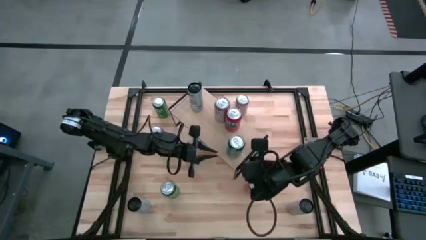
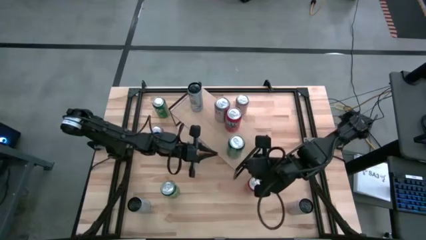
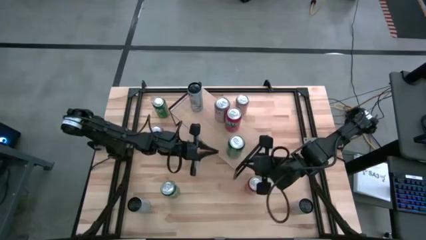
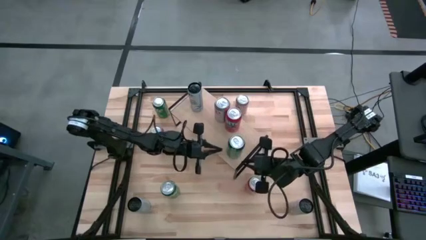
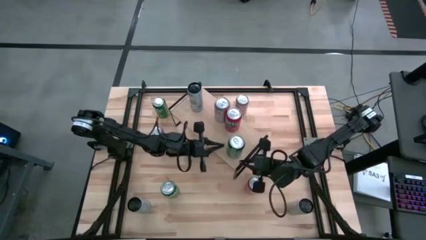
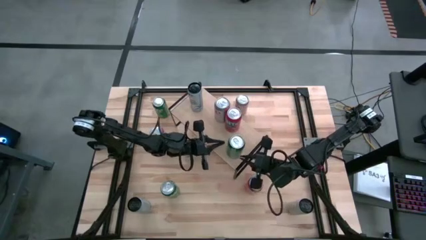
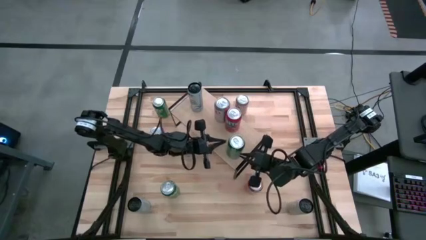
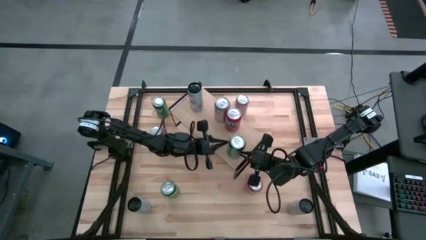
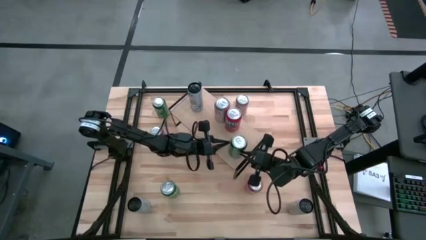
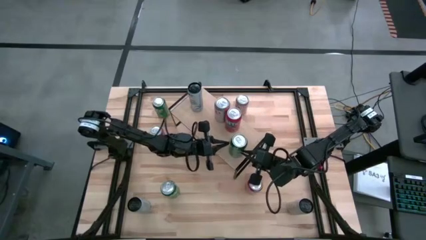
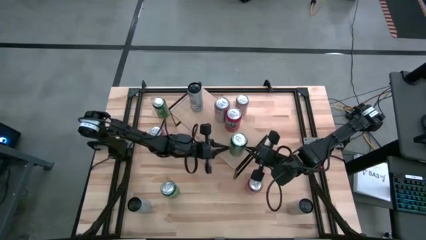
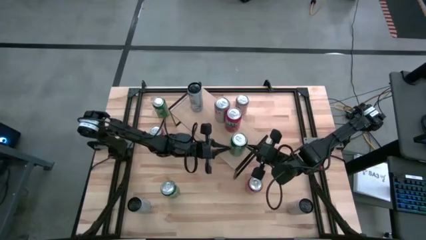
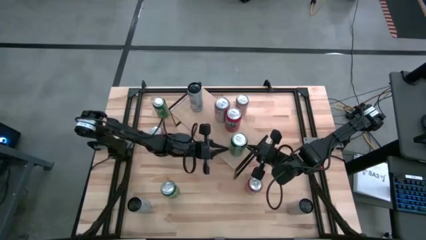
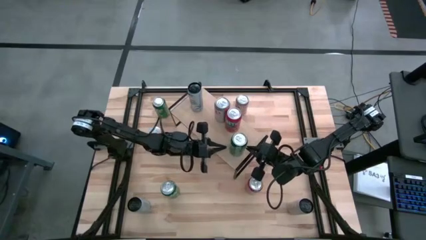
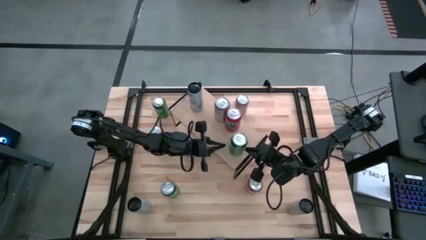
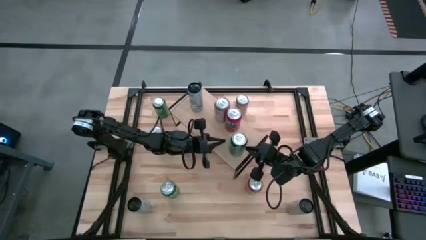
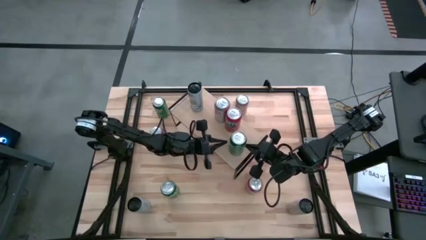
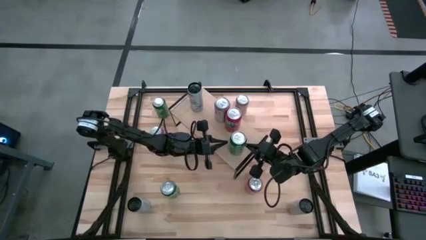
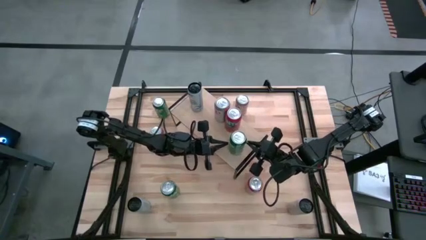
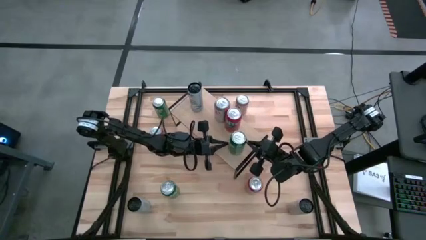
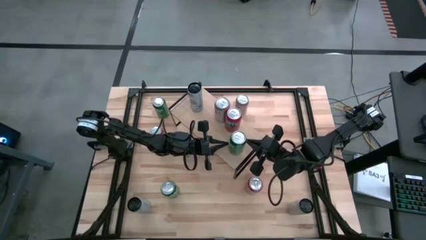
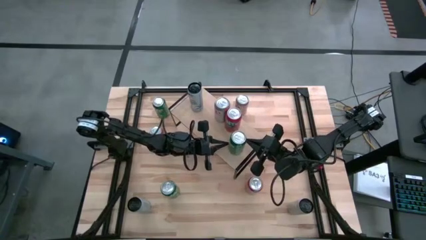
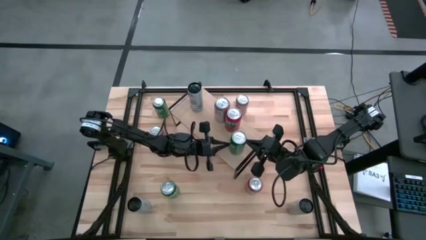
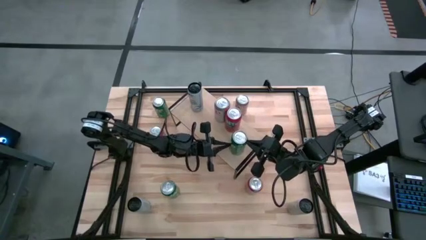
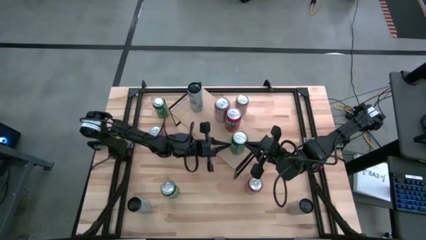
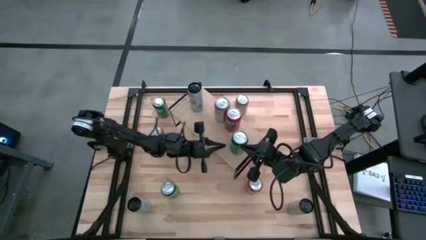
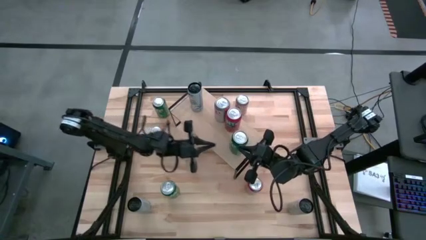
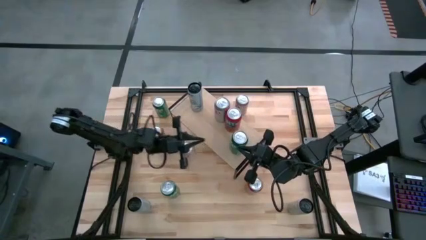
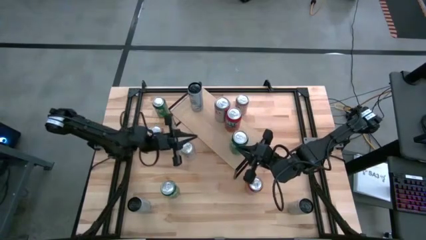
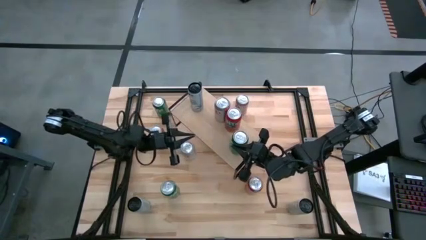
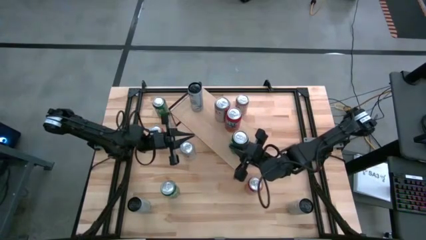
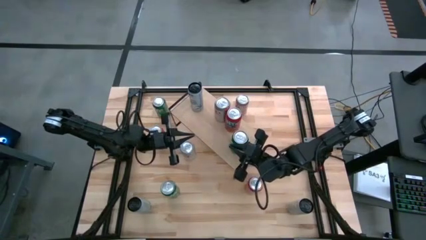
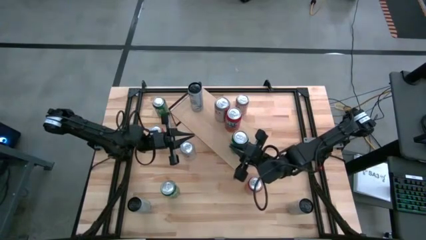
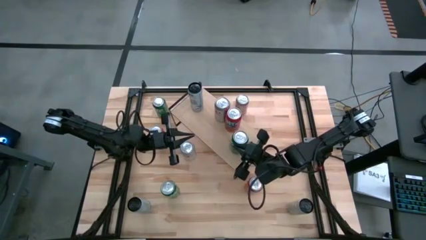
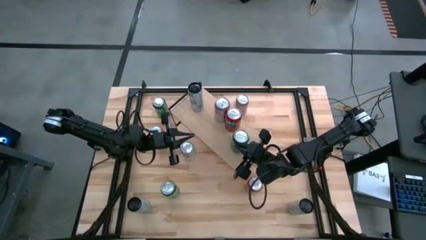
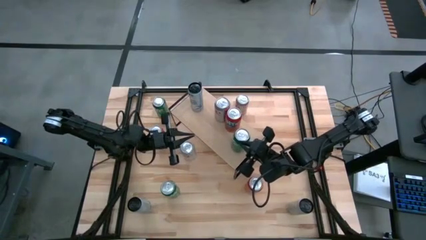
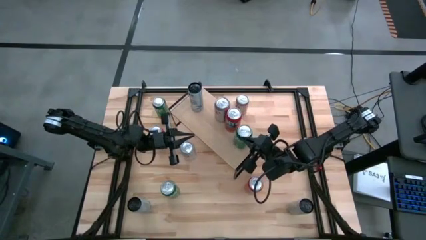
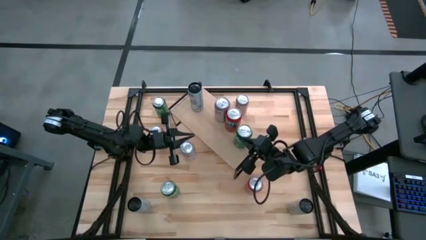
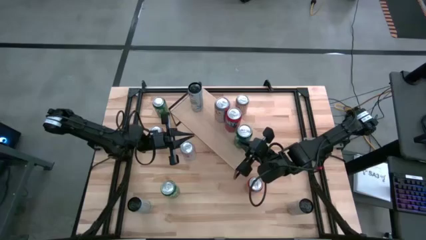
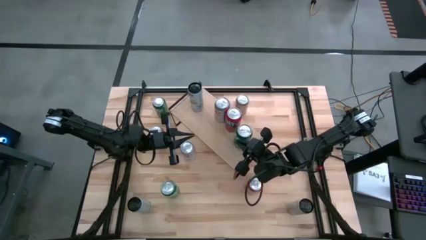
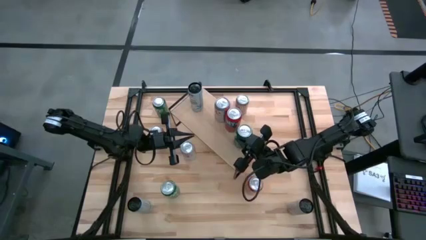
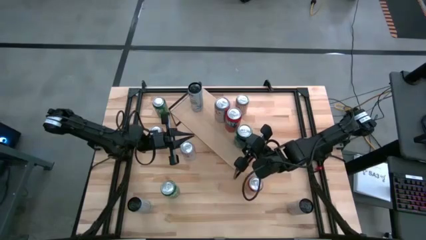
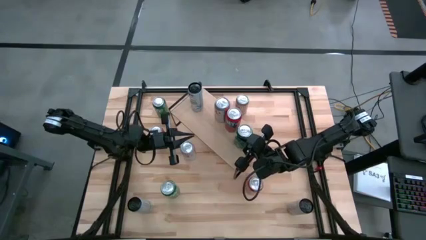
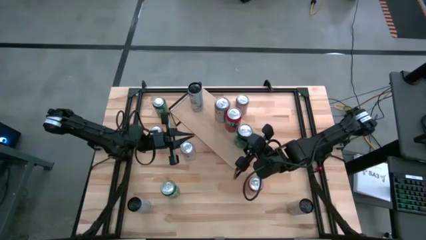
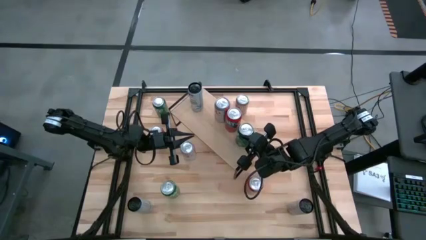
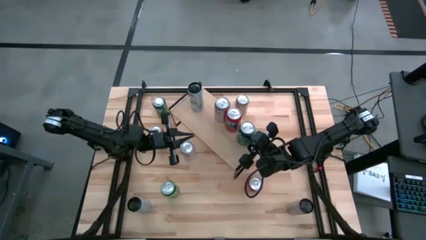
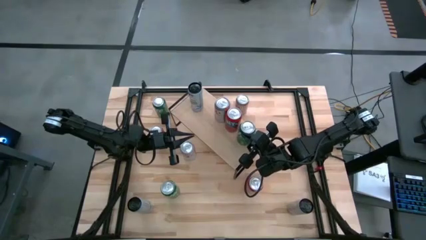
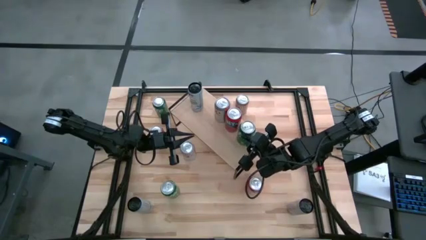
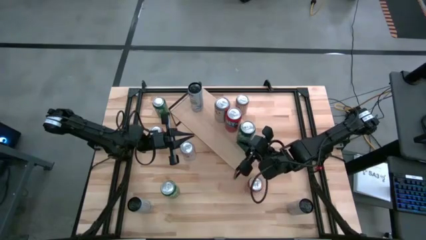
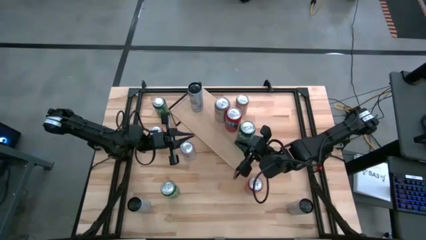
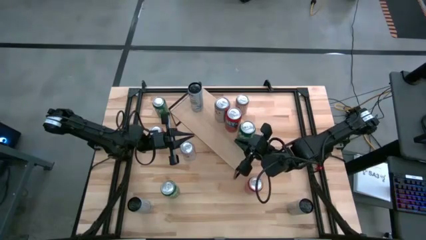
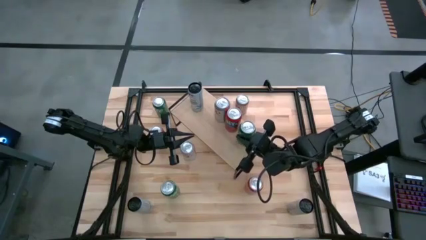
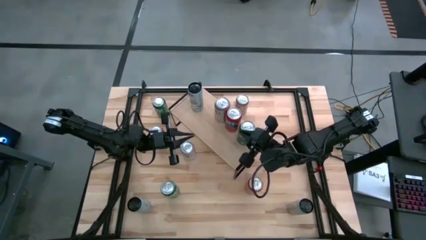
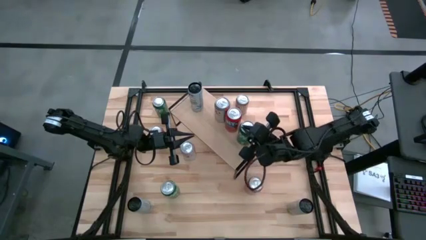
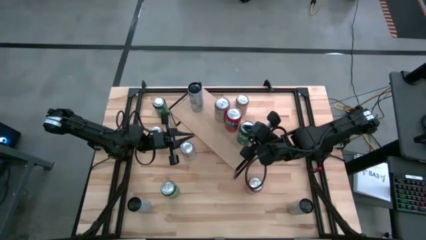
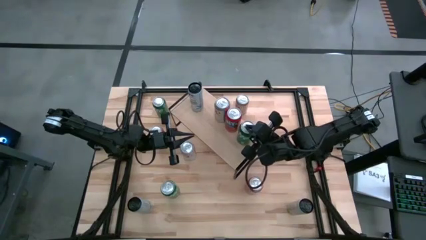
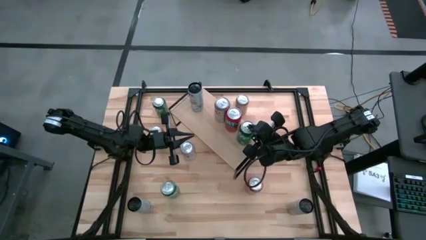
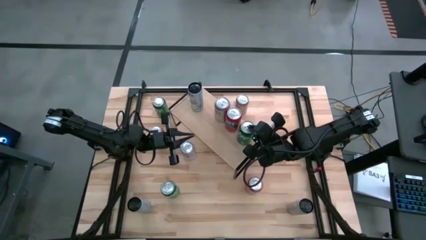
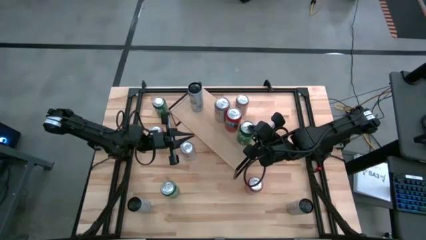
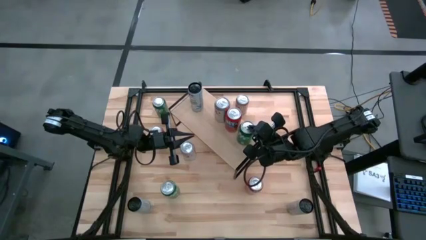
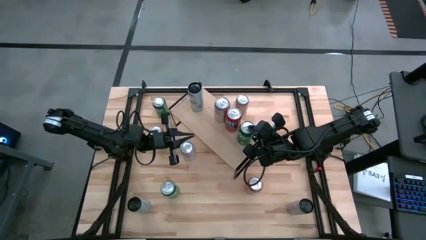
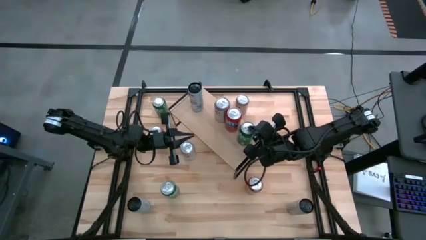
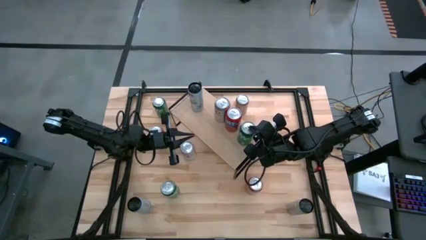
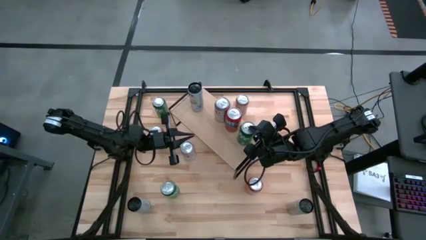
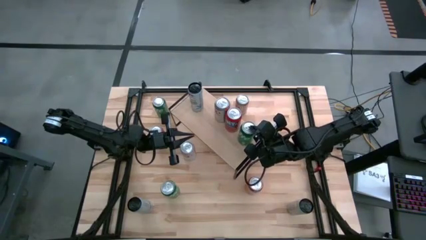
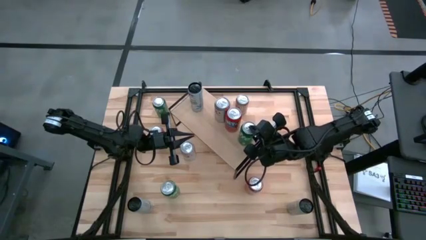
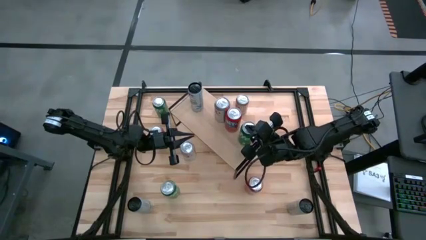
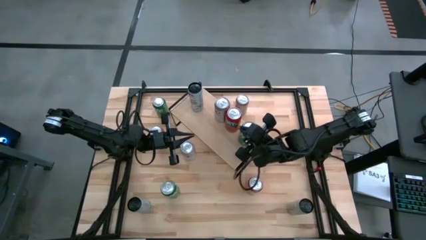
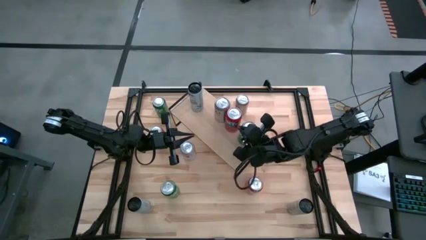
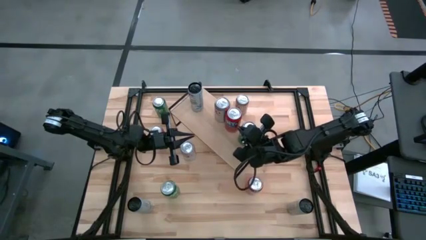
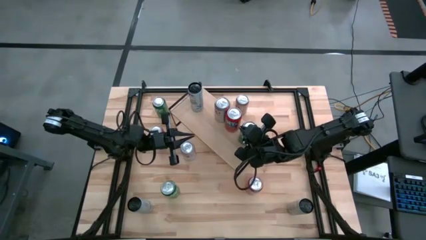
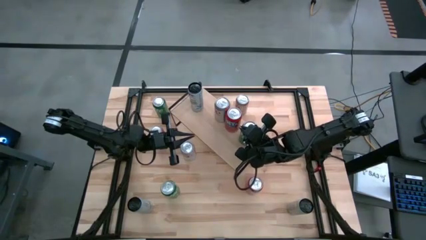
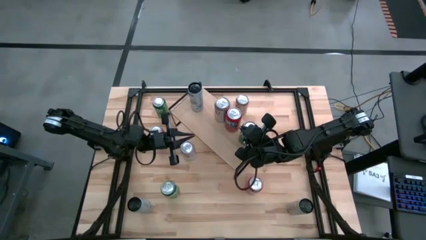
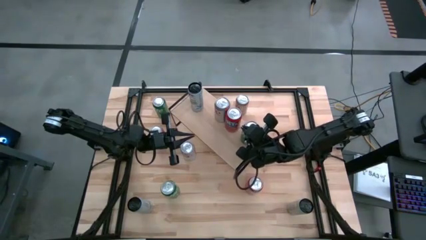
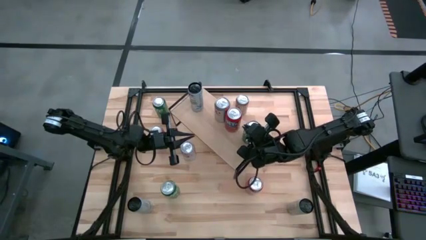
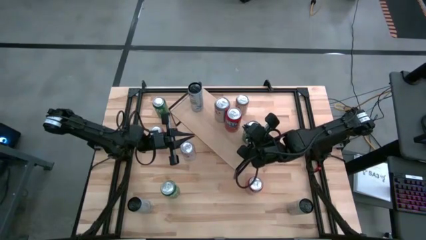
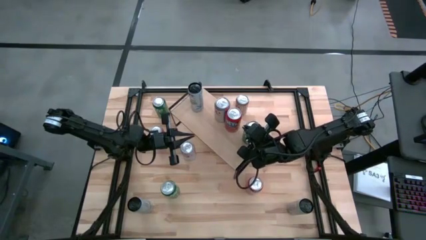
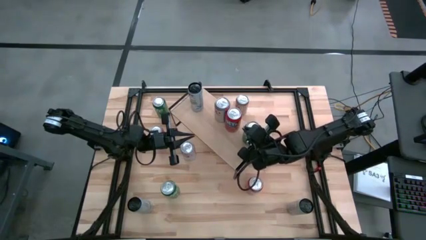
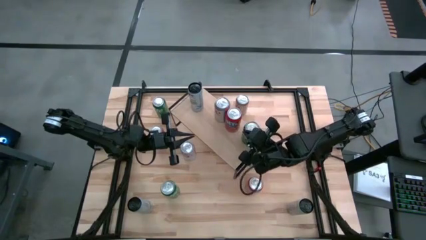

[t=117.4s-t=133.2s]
Task: Place canned beverage on shelf
Put the bottom right green soda can on the shelf

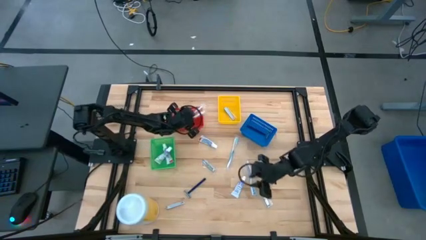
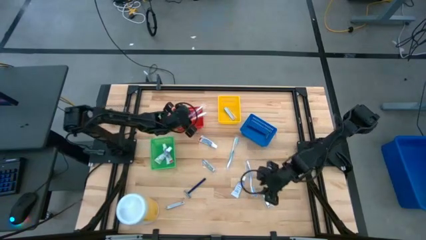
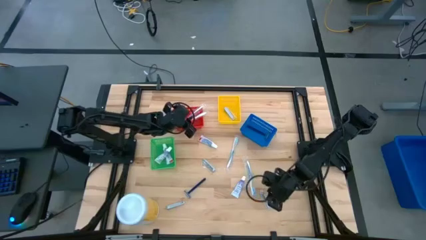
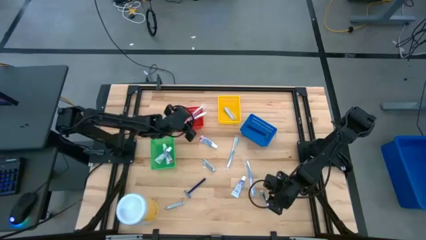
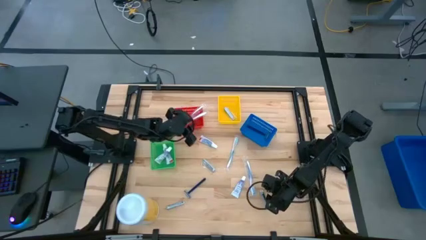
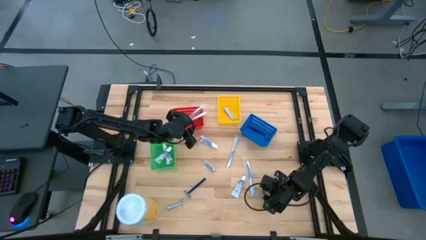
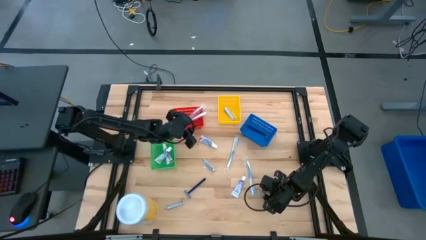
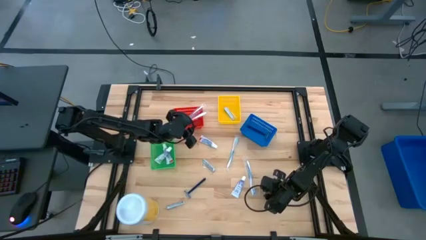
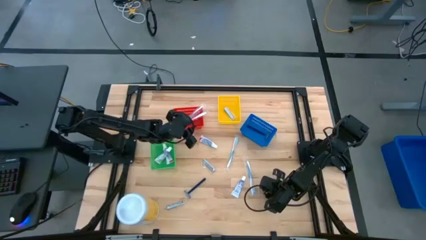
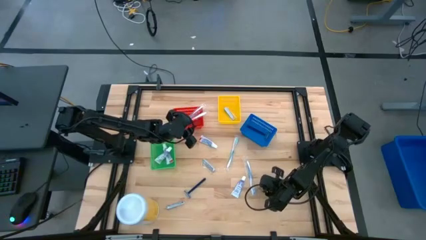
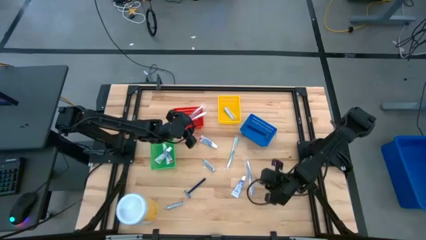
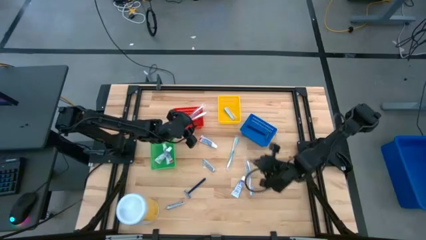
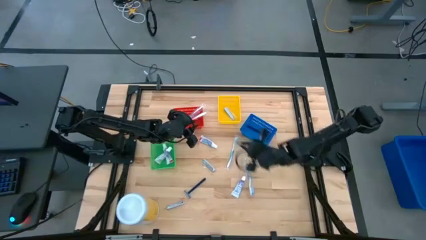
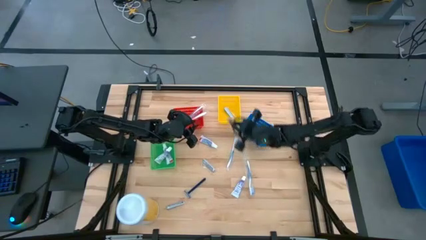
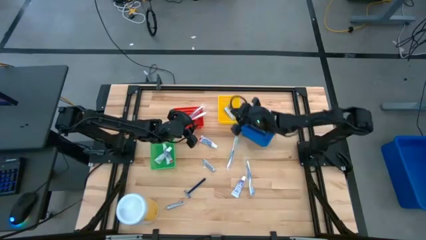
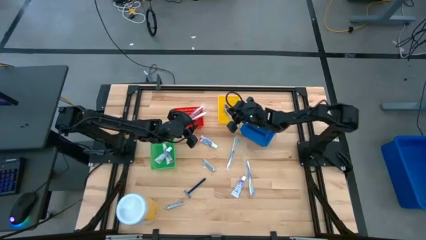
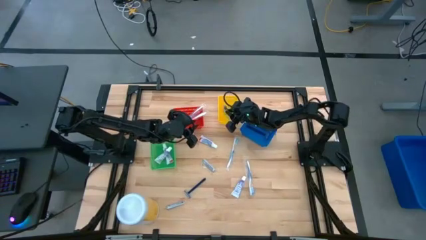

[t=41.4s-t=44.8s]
Task: Pick & Place Travel size toiletries
Put the silver nail cutter into the yellow bin
